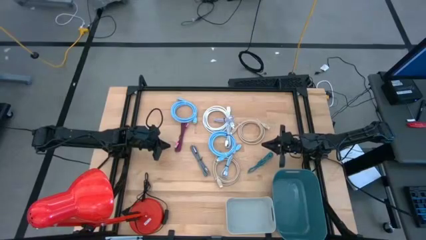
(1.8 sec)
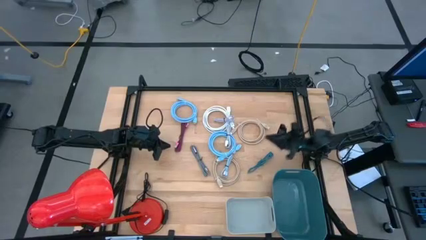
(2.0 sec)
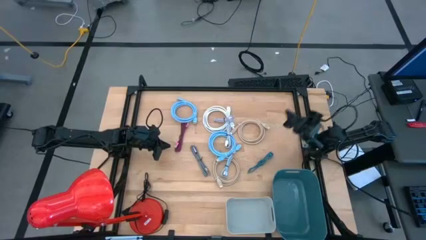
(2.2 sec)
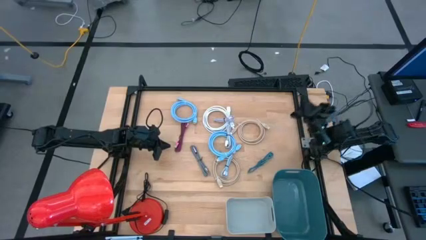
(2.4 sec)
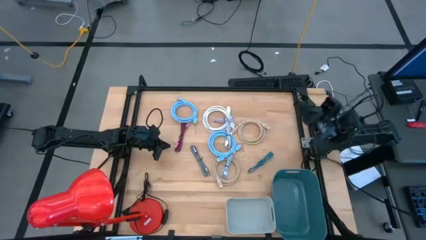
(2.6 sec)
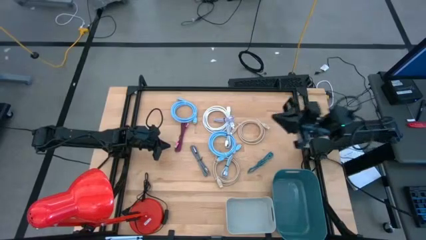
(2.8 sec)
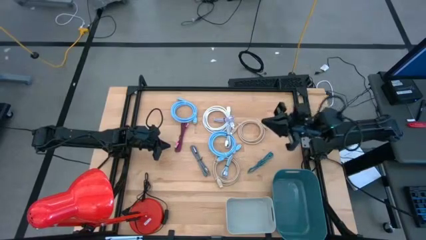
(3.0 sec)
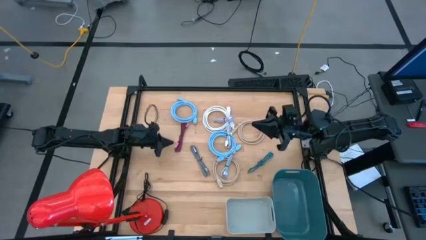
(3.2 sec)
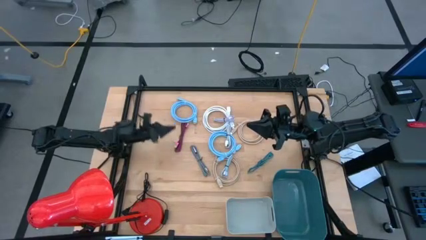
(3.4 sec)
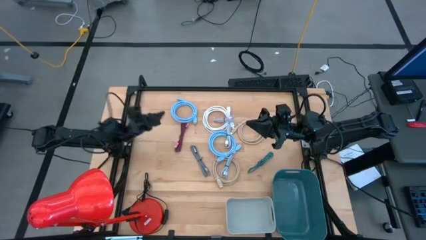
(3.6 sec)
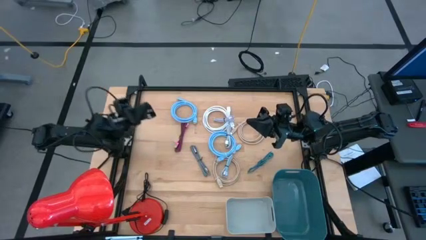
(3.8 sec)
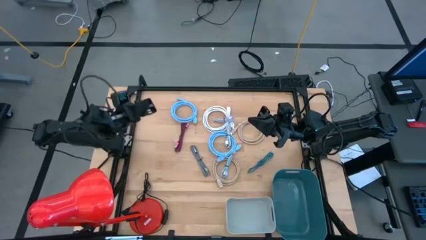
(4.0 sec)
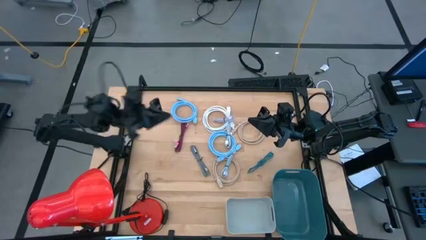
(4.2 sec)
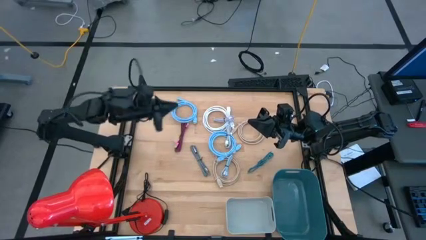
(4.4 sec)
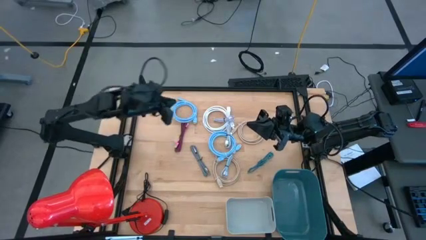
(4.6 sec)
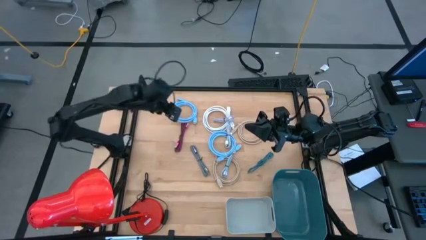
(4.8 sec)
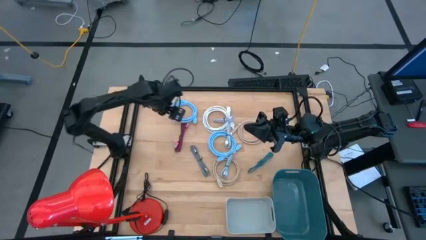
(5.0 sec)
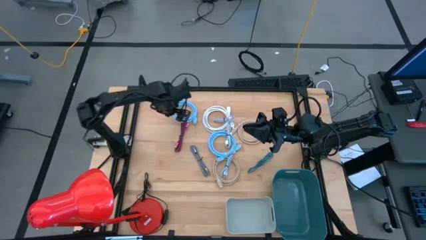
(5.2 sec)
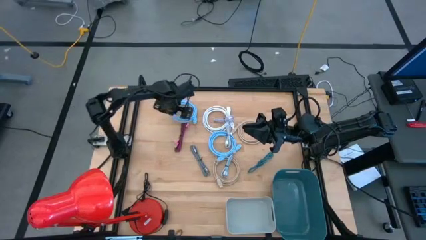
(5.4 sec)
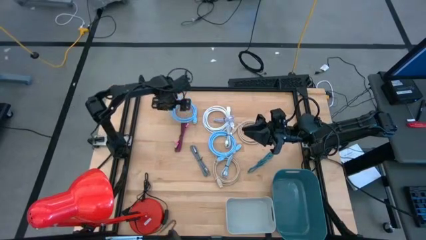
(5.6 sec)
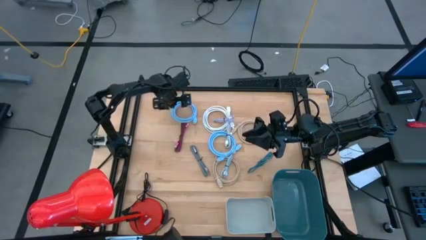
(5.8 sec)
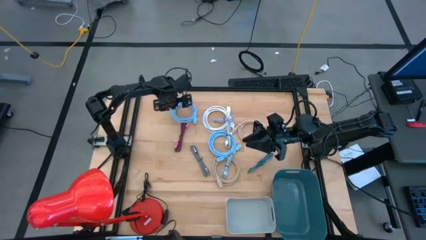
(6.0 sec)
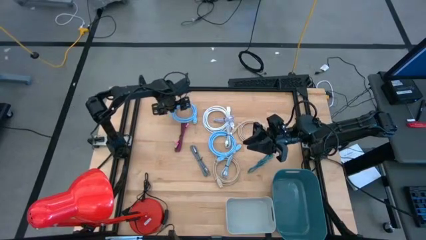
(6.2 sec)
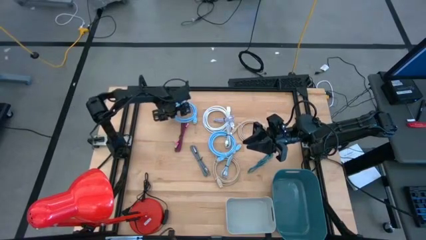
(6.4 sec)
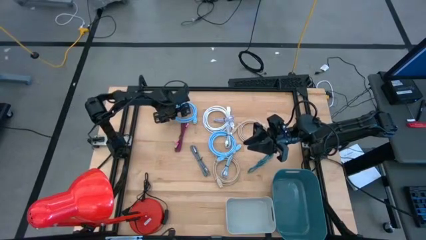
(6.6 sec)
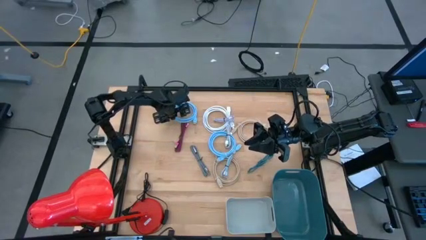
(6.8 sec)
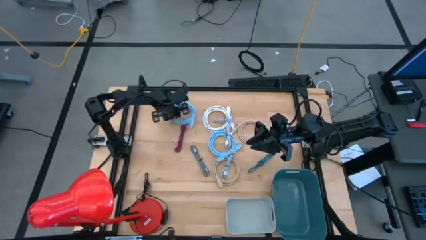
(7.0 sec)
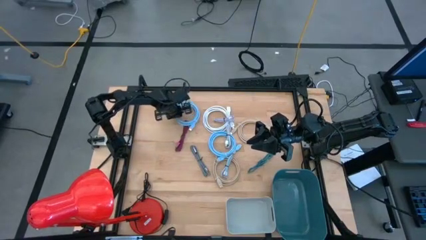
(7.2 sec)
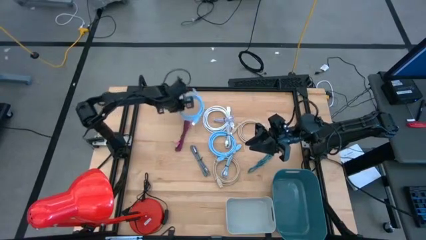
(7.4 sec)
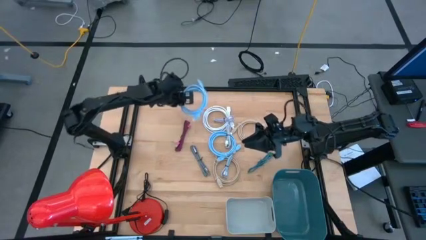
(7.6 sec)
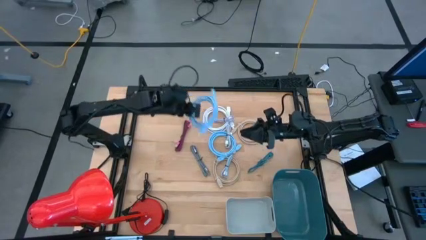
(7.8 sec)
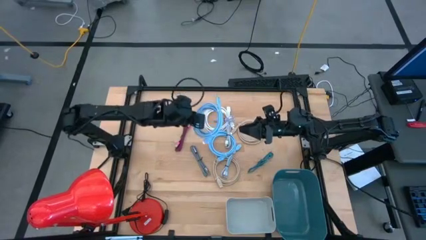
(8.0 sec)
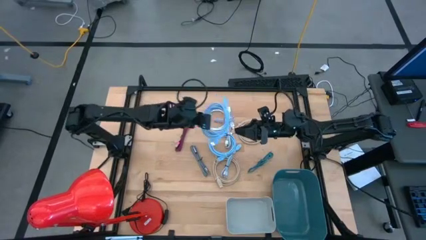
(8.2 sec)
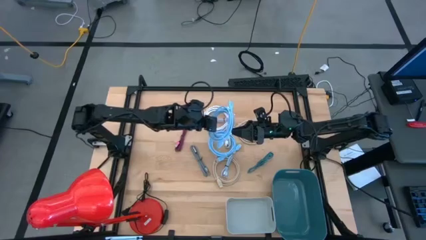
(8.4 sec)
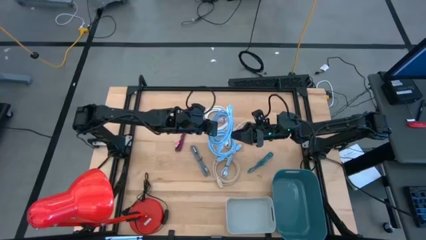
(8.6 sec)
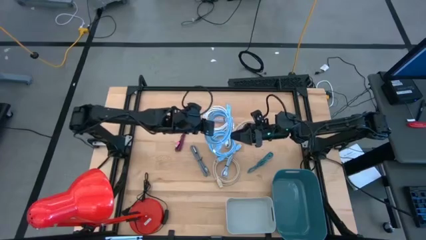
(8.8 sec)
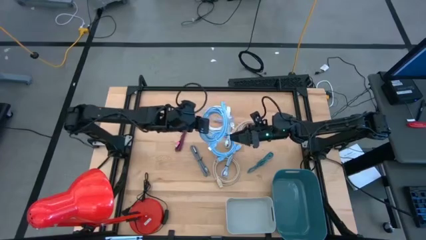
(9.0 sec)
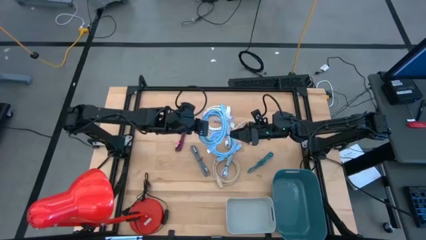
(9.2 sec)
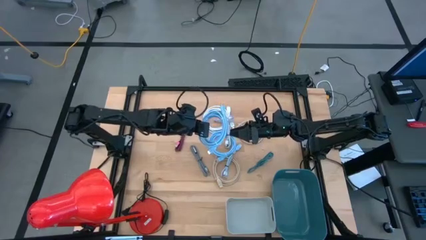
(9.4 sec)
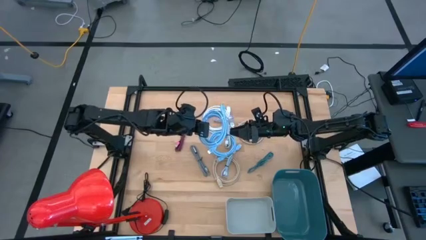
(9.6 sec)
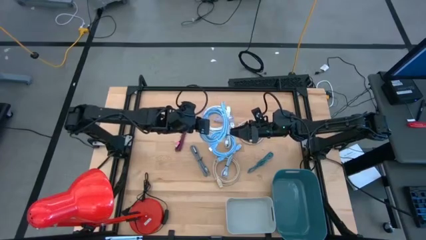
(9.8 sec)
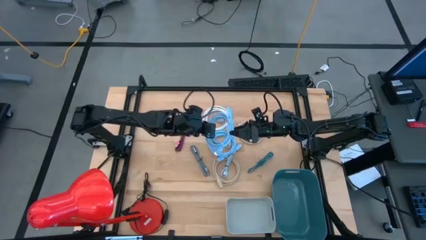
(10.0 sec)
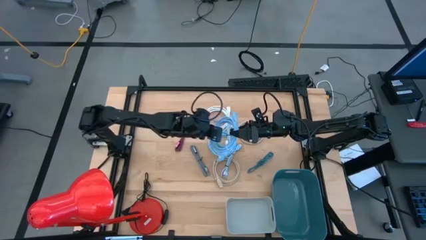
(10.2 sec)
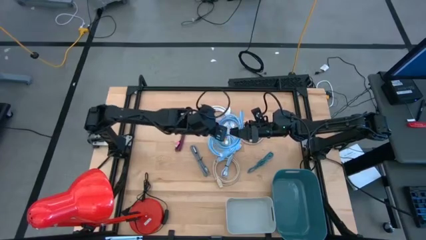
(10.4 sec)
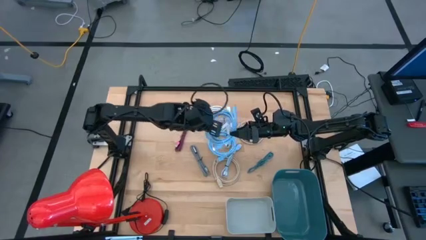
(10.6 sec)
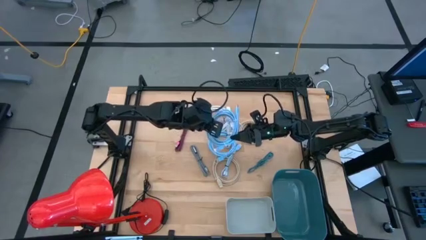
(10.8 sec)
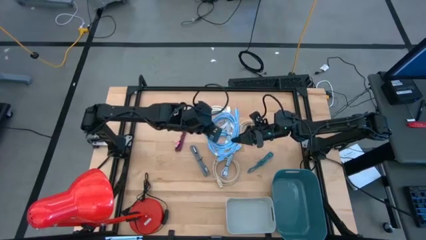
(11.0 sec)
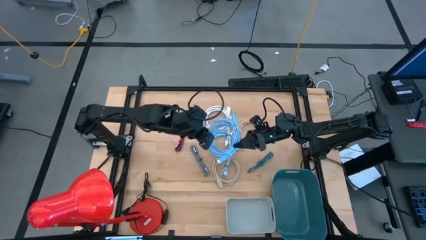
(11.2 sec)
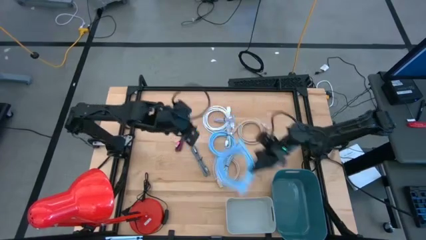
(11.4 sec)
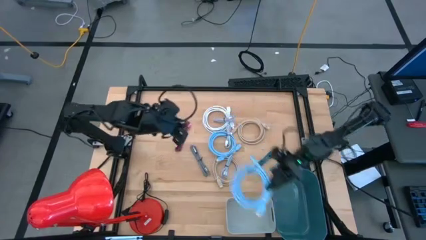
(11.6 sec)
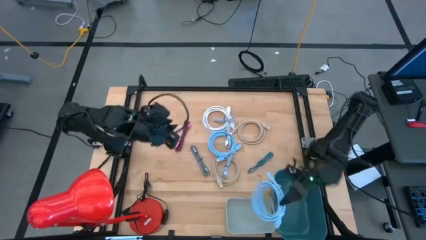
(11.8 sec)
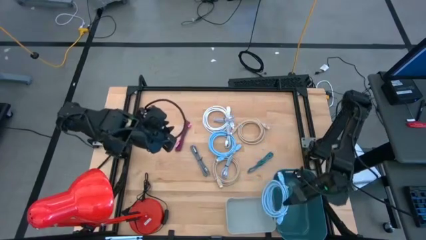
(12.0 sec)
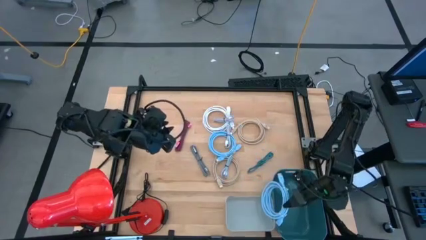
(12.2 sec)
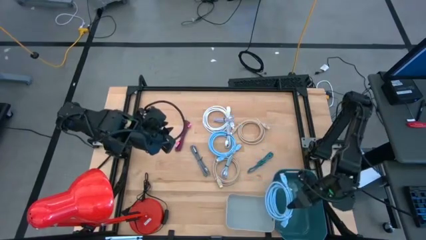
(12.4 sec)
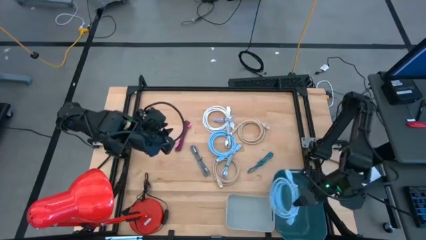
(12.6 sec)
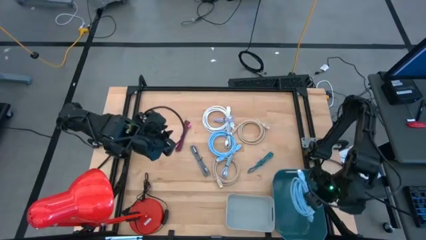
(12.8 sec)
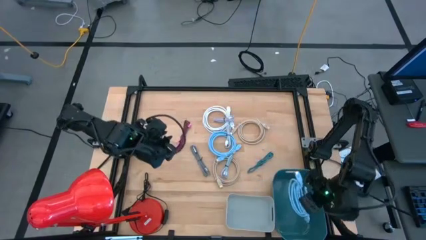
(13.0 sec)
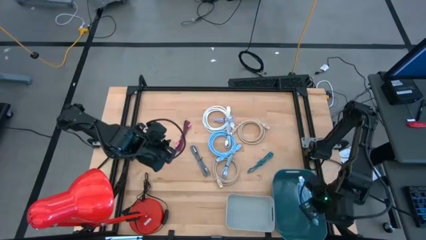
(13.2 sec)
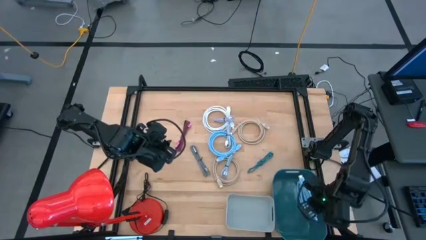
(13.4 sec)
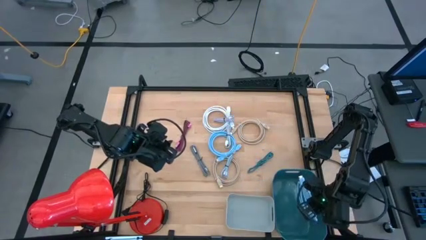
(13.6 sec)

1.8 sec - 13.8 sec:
Task: Pick & Place USB Port
Put the top left HDMI cable into the blue bin
